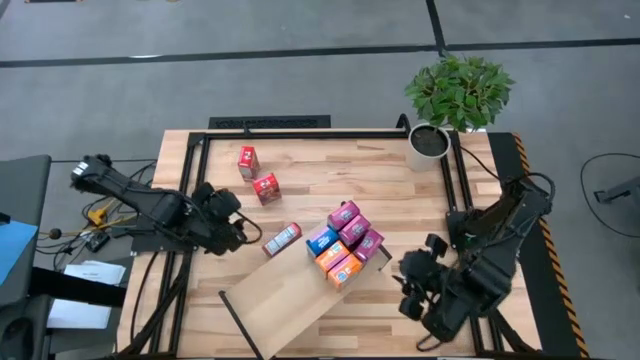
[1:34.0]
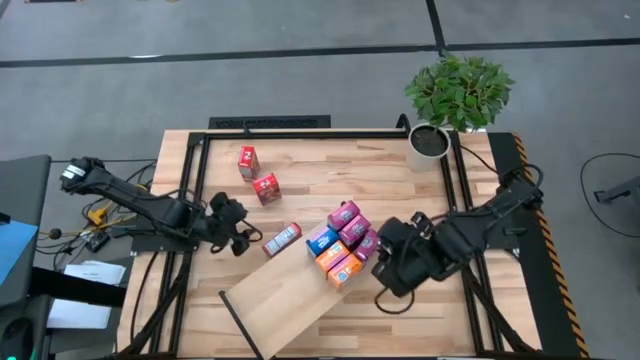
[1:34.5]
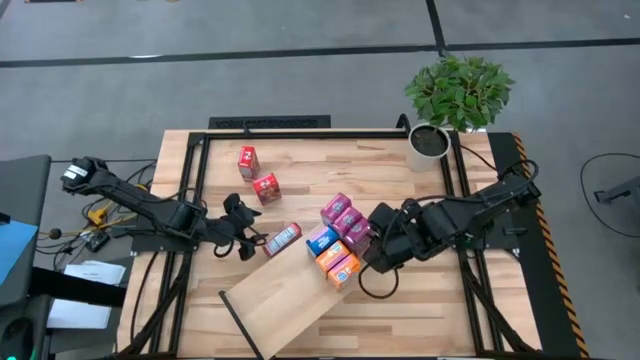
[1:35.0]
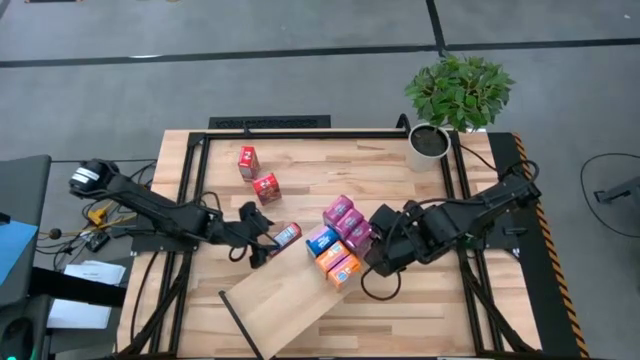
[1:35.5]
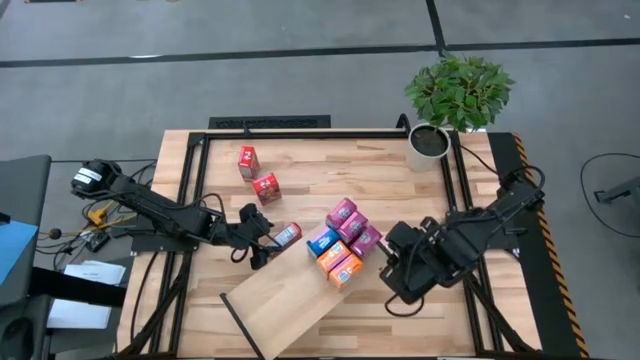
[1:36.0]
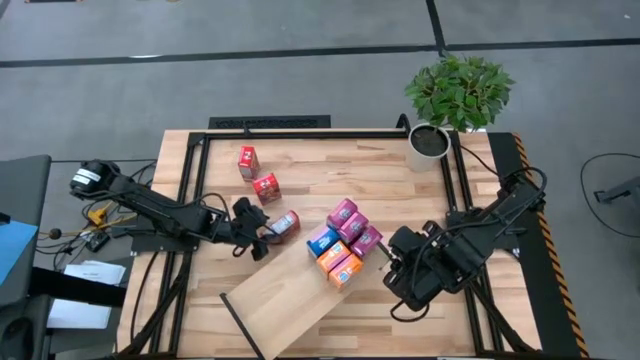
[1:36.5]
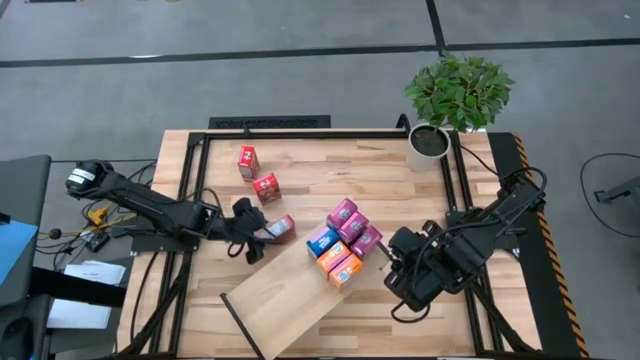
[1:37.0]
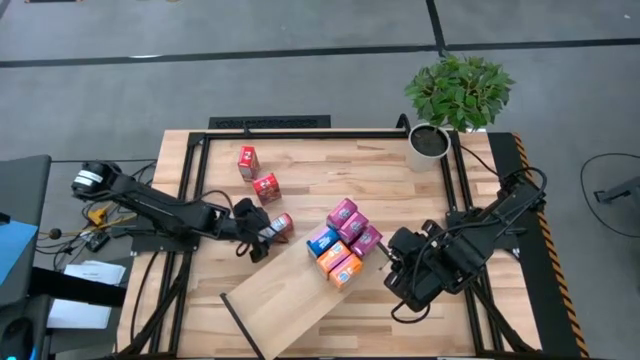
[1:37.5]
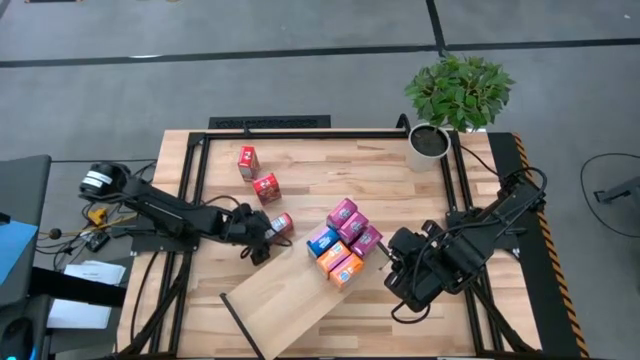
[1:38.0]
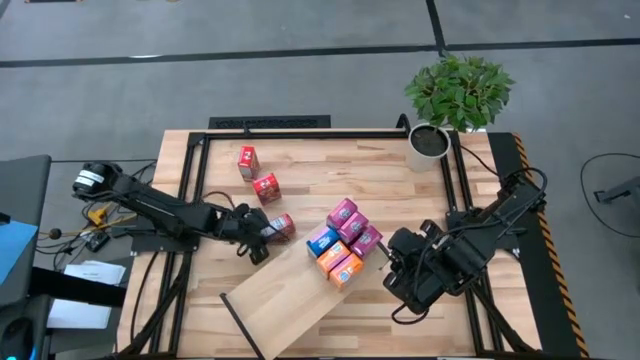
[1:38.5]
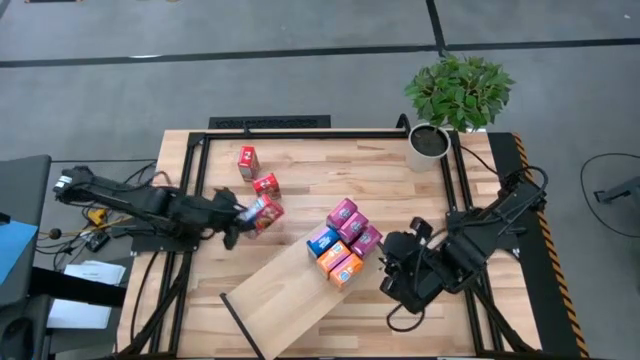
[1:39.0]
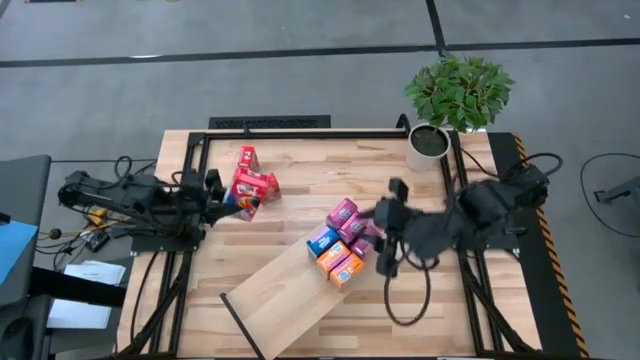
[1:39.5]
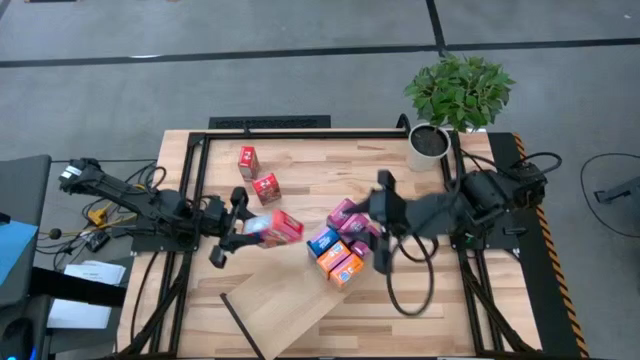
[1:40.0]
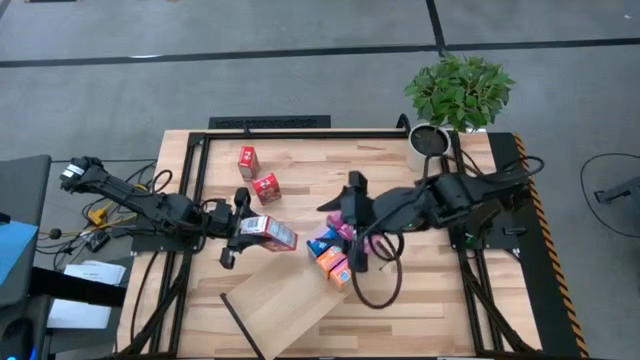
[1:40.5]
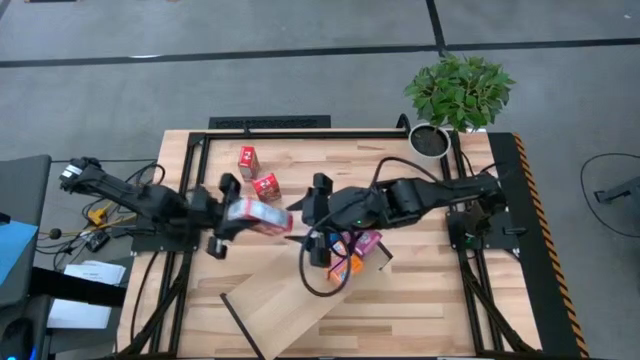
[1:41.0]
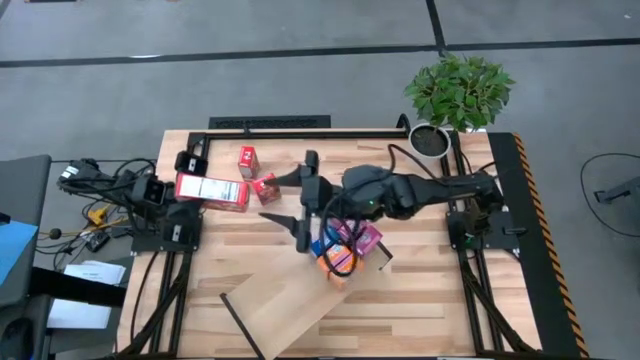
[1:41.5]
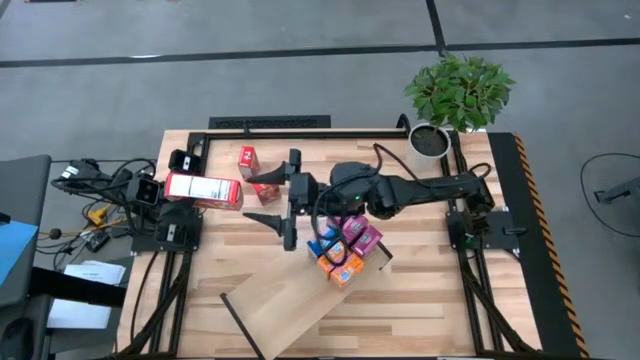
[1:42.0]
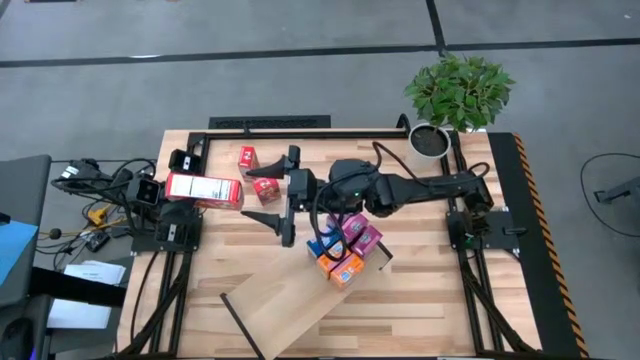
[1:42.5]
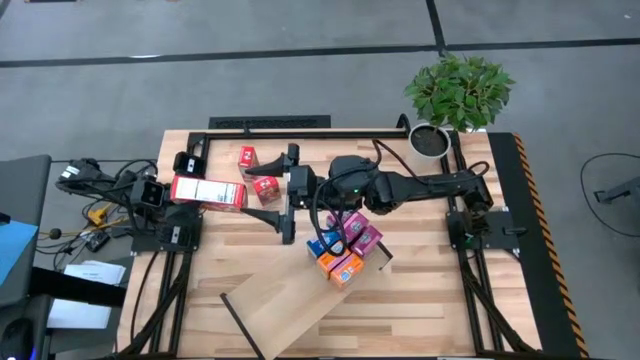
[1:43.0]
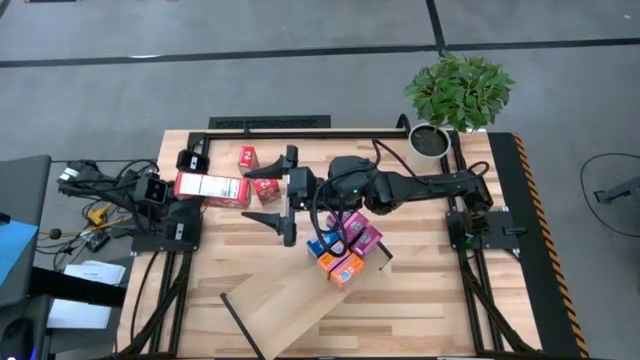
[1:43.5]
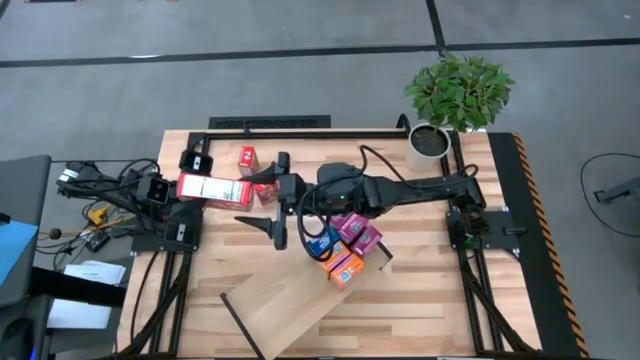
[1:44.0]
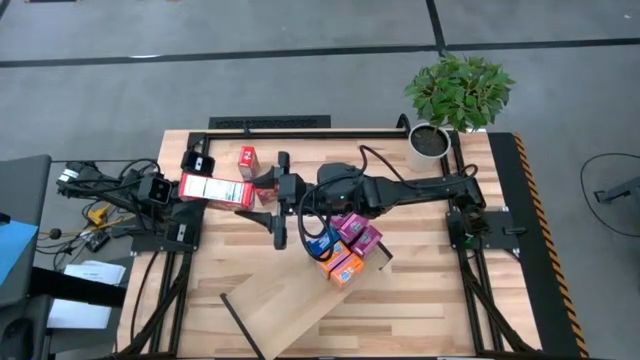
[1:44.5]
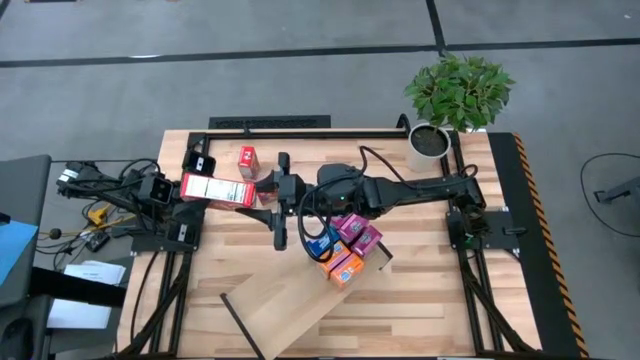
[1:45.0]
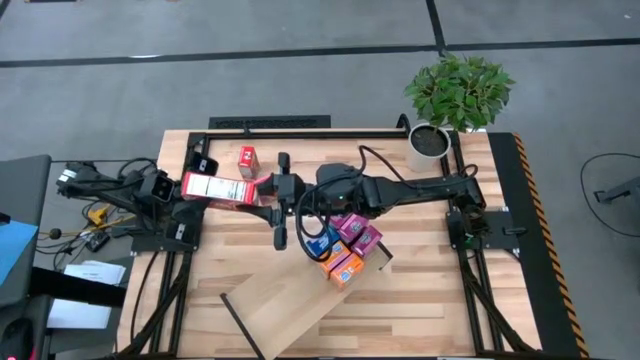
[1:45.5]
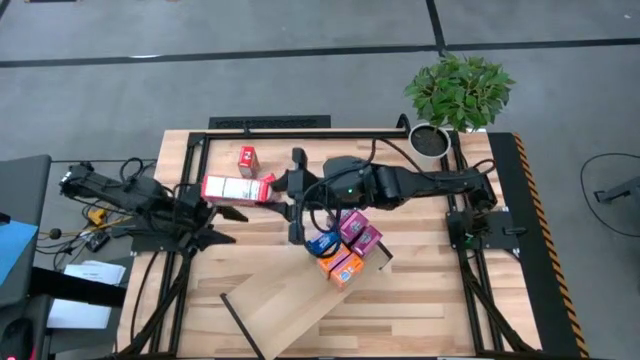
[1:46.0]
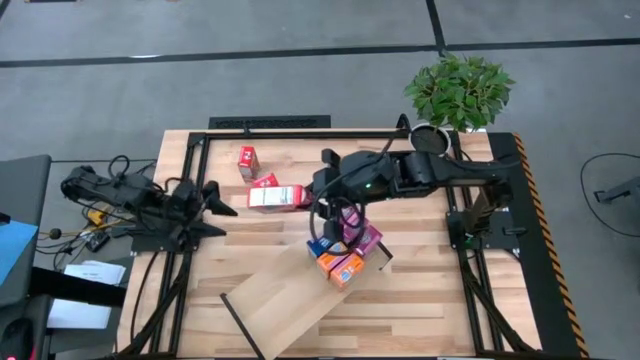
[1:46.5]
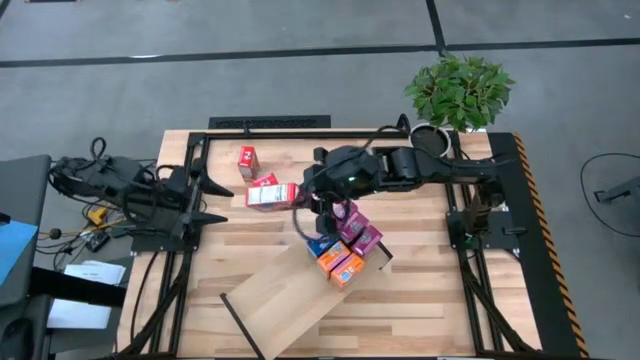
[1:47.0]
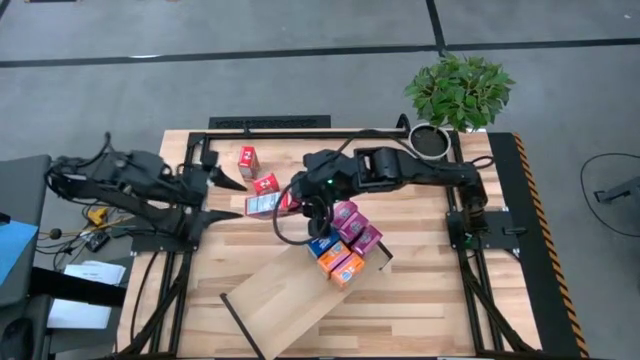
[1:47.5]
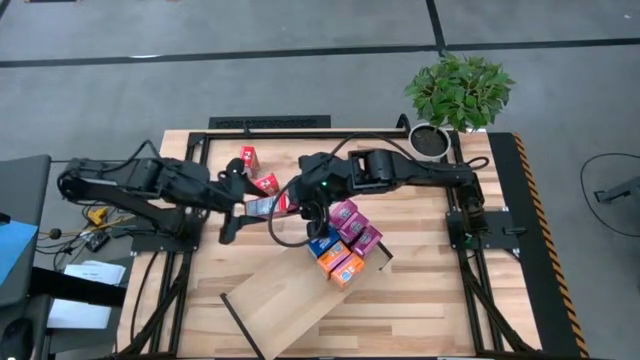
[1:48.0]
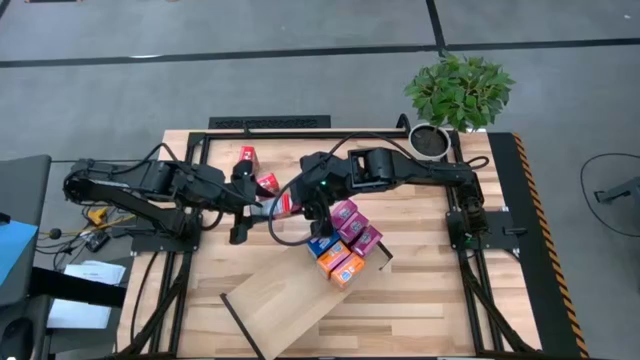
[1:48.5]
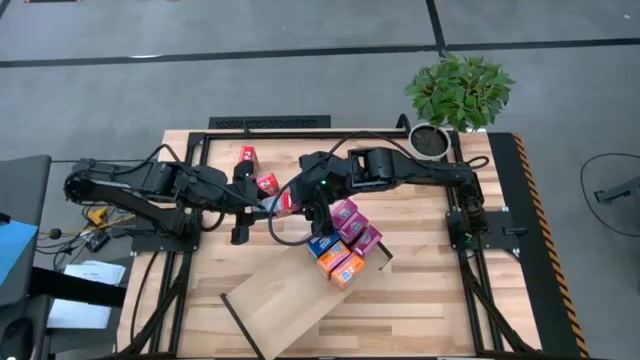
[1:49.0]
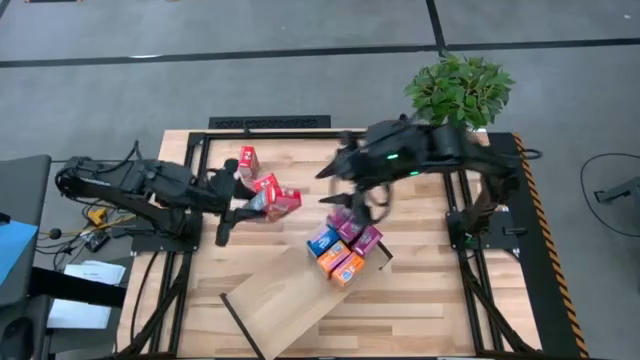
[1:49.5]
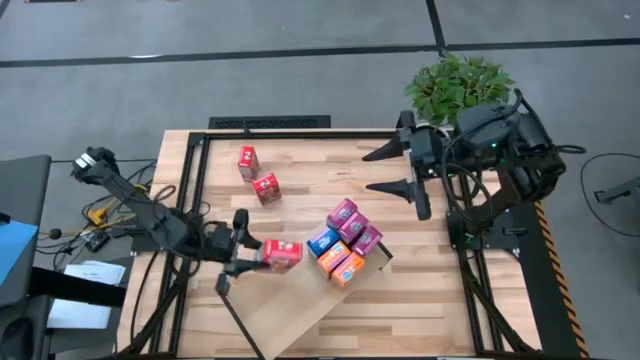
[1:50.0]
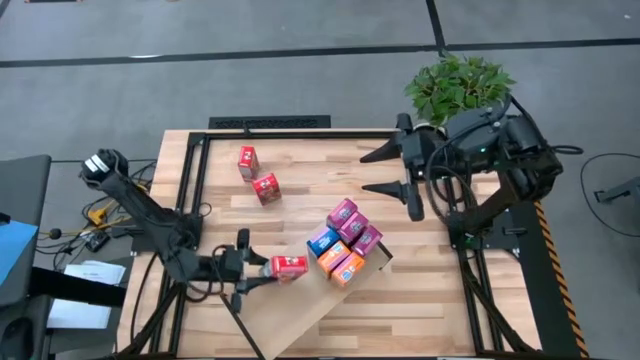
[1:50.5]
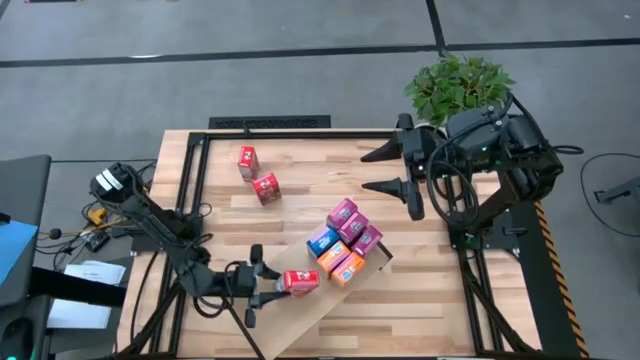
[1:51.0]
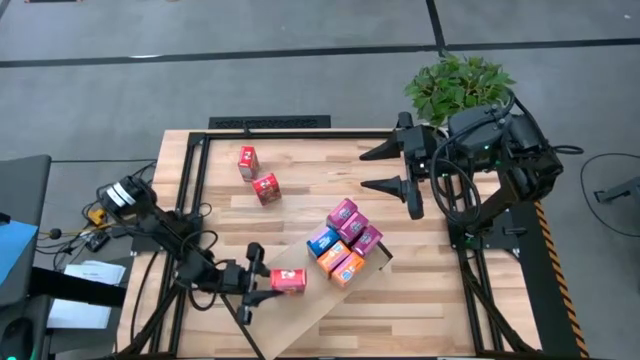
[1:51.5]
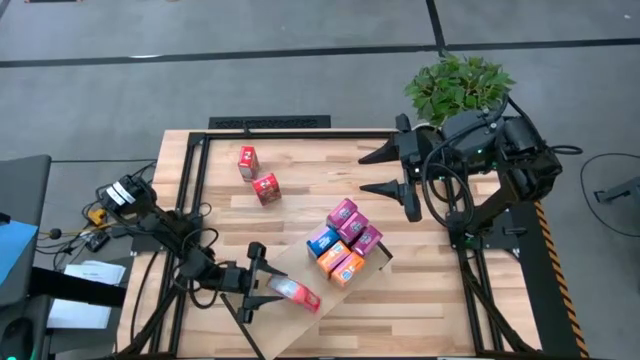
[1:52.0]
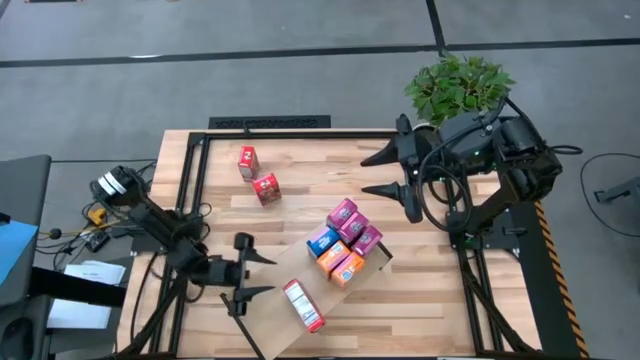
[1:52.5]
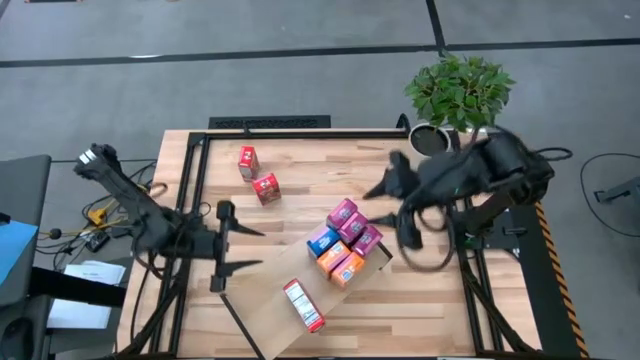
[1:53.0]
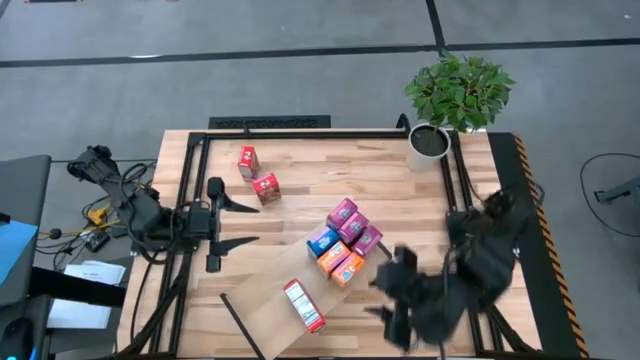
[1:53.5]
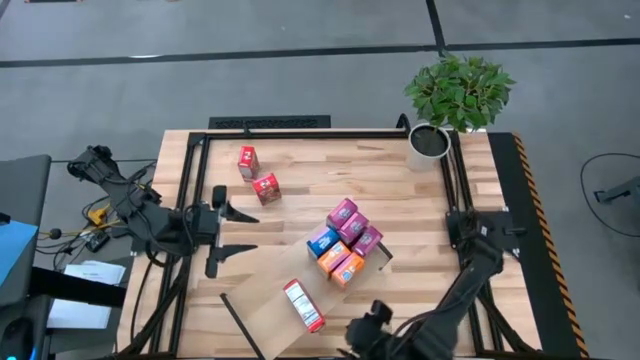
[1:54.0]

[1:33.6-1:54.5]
Task: Stack cereal on shelf
Put the bottom red cereal box onto the shelf
